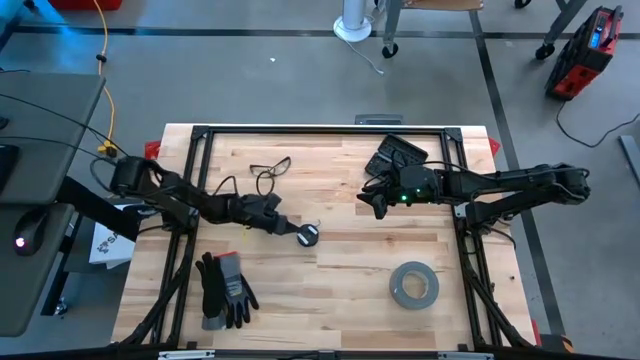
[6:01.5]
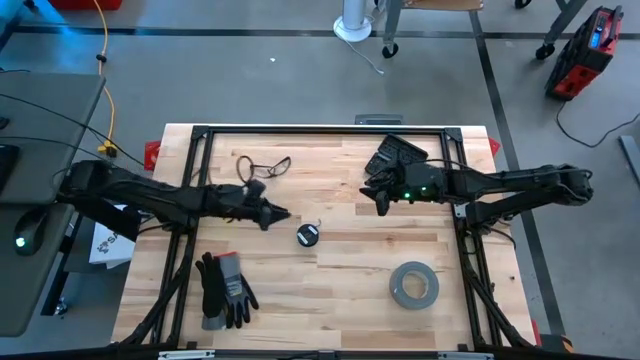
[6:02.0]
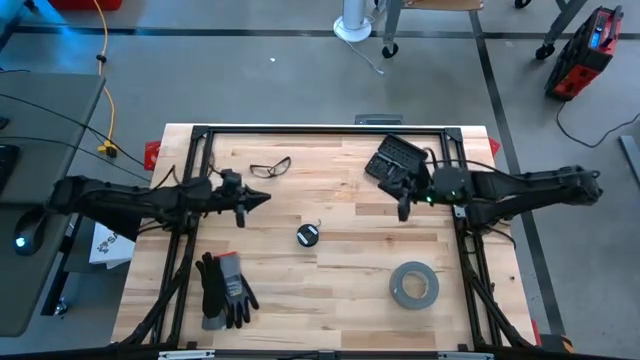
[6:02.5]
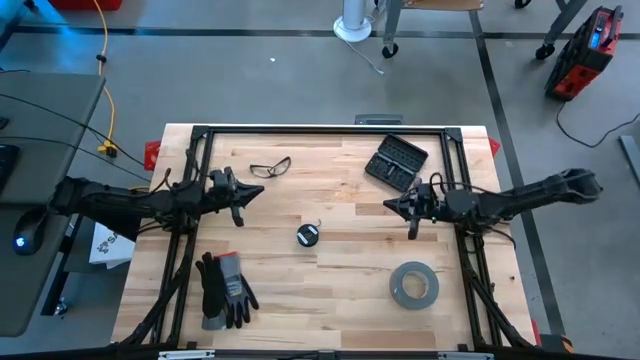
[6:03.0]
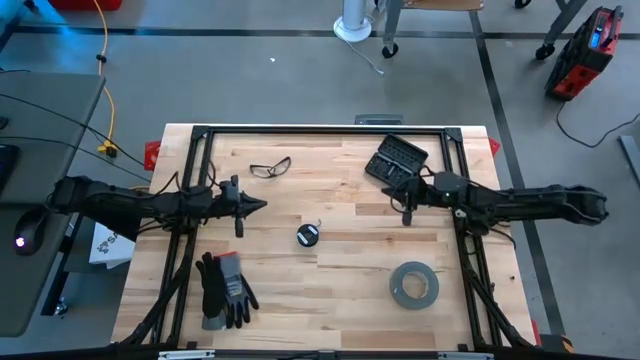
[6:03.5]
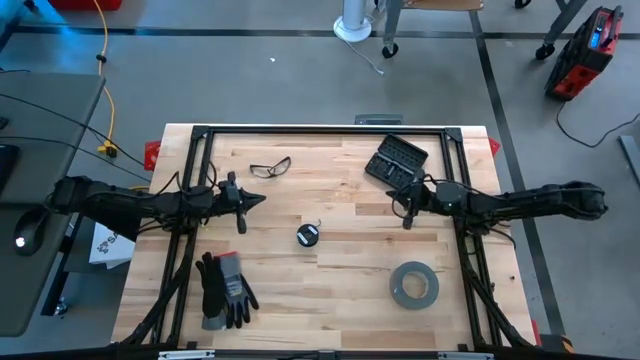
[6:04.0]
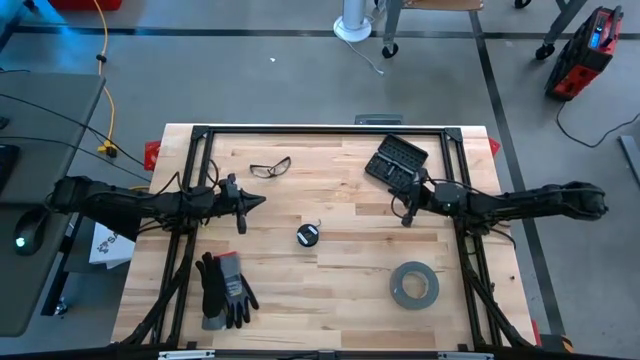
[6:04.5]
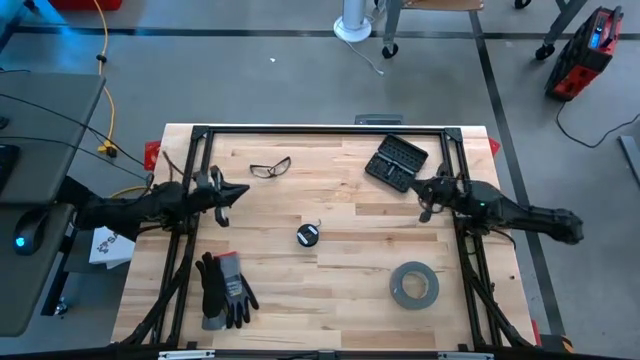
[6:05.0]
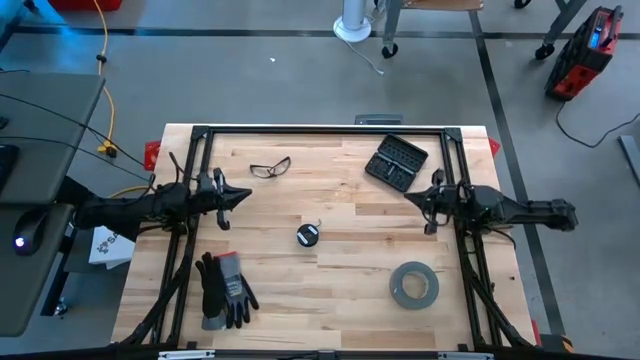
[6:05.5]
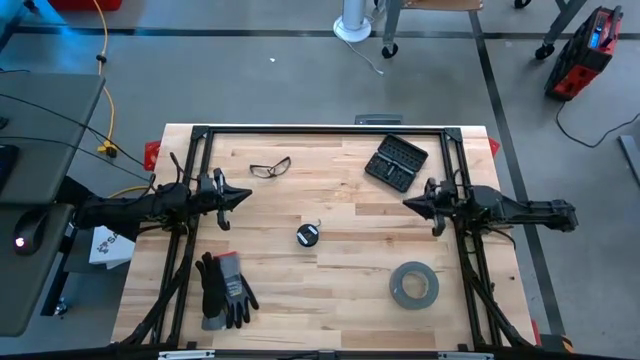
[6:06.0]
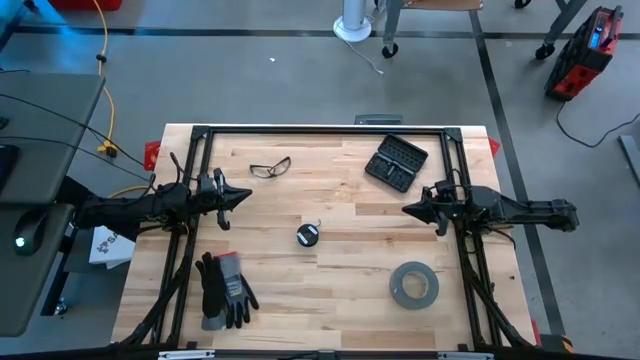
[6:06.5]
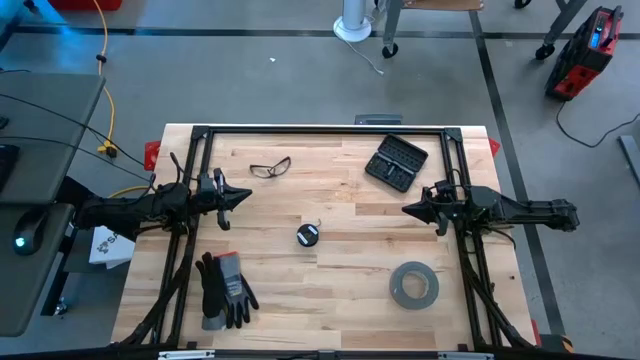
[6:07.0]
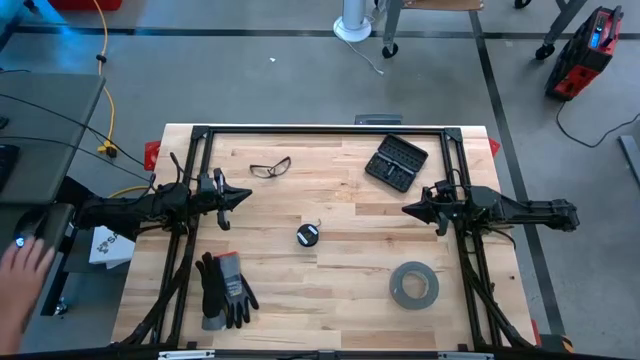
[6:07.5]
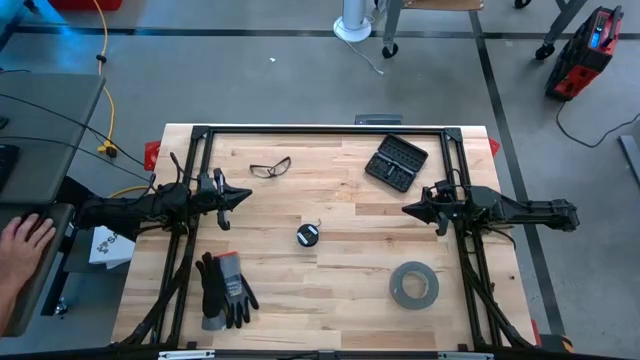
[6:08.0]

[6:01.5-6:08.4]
Task: Coil cords
Return to Home Position
